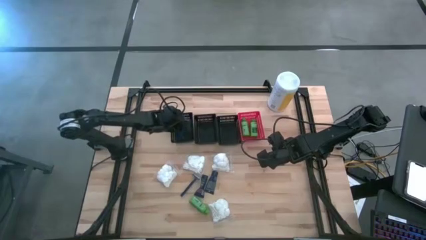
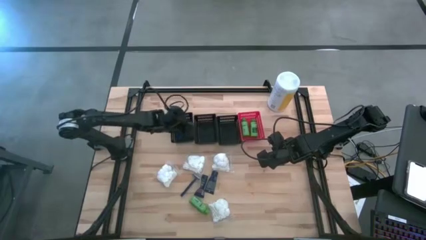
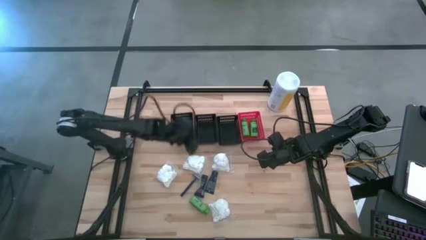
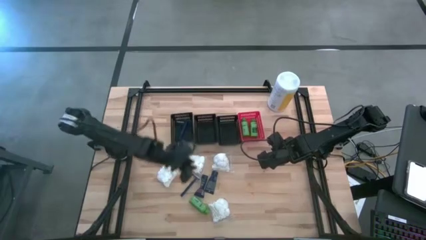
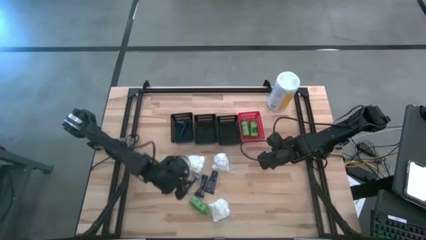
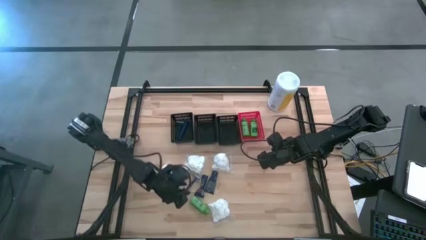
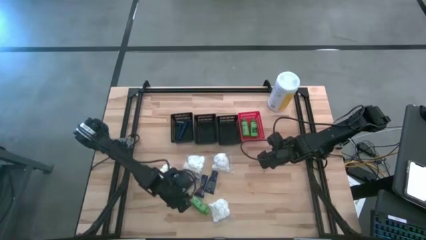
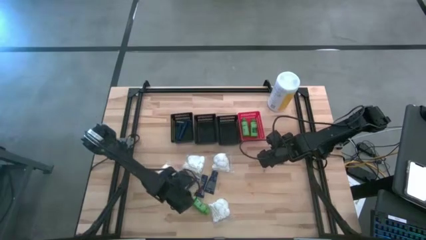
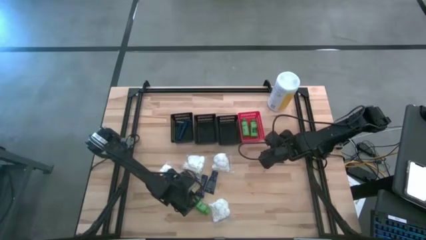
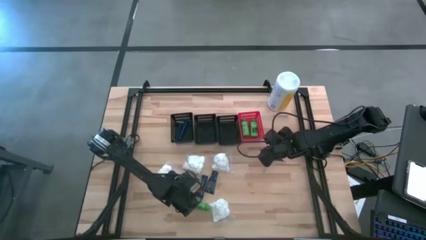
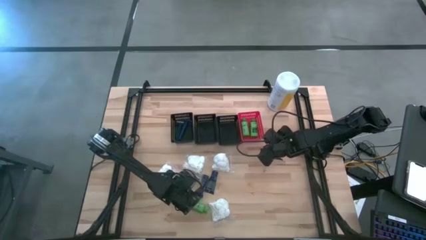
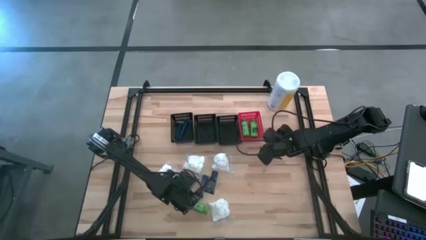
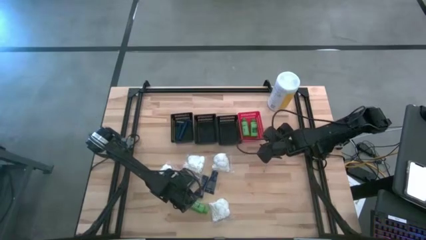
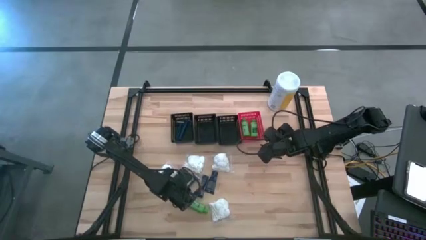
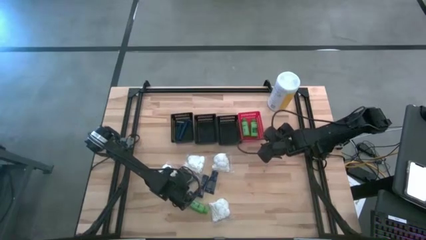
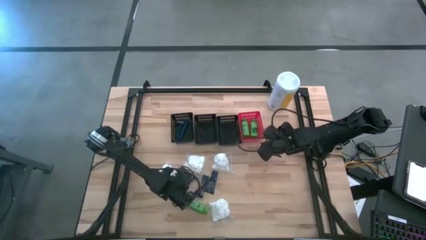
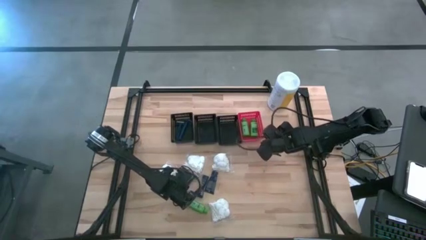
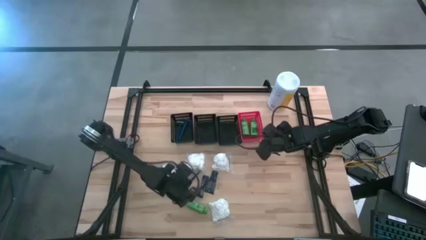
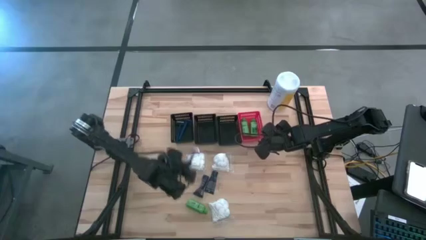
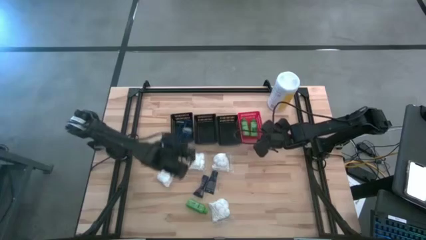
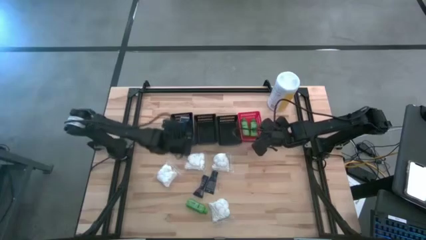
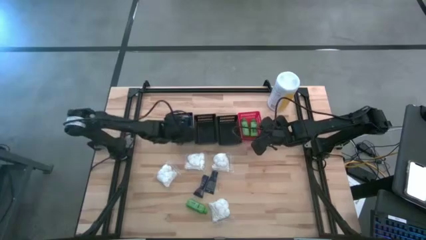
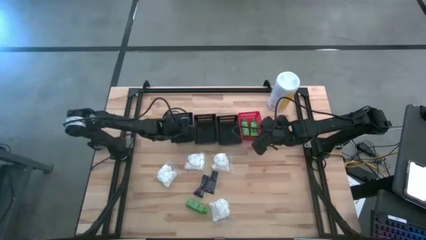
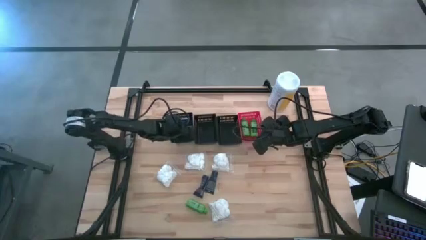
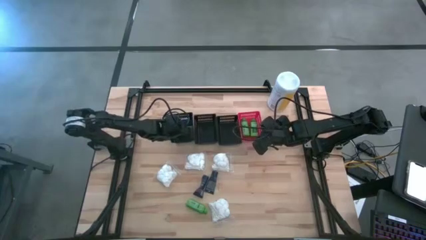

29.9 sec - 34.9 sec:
Task: Pick & Place Travel size toiletries
Put the blue razor into the left black bin

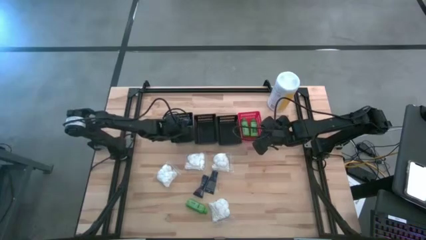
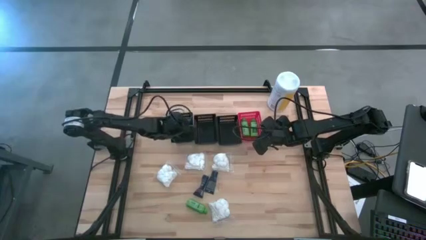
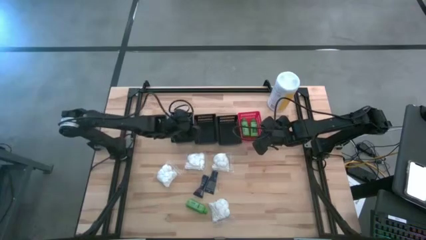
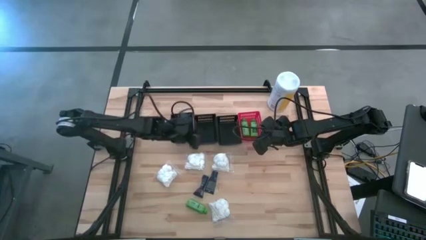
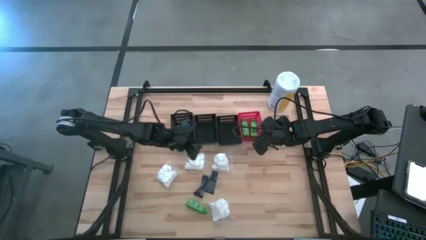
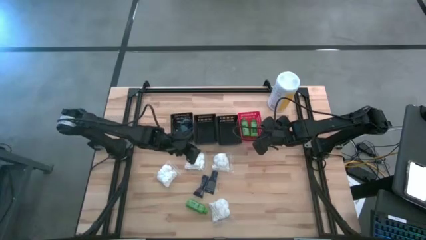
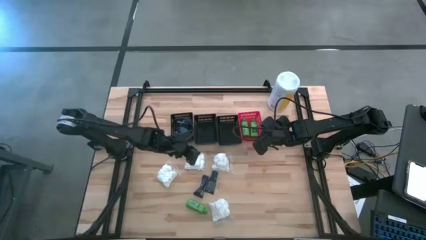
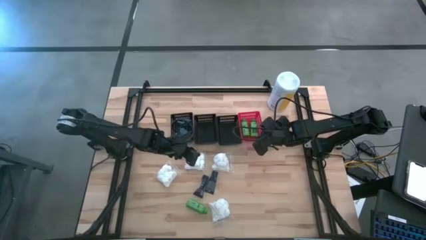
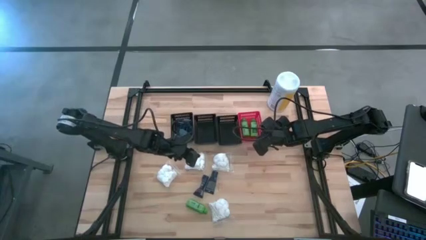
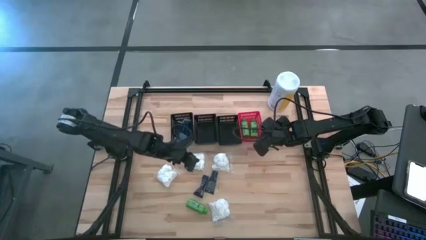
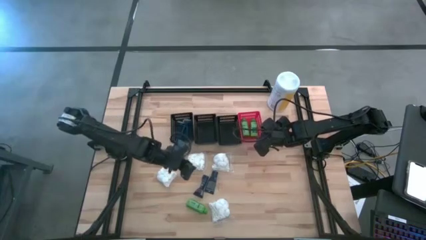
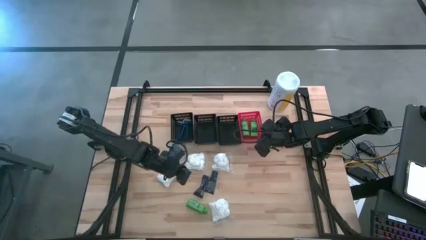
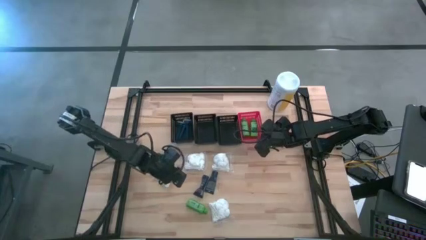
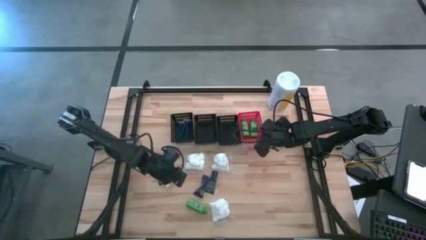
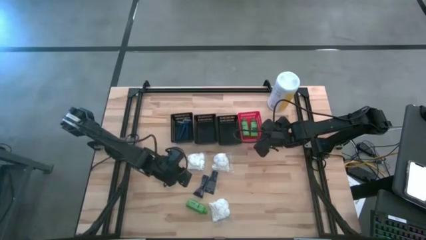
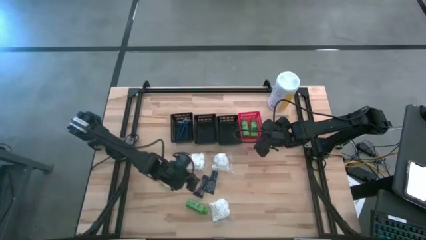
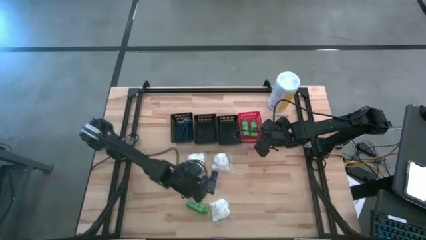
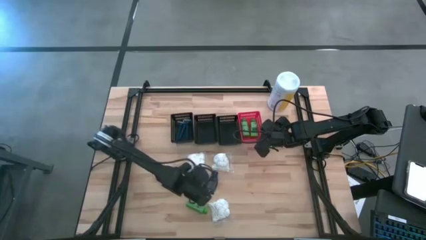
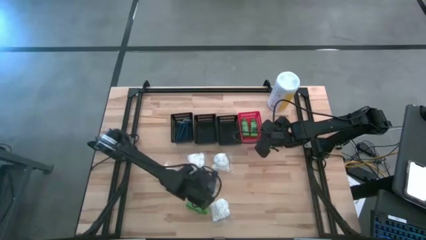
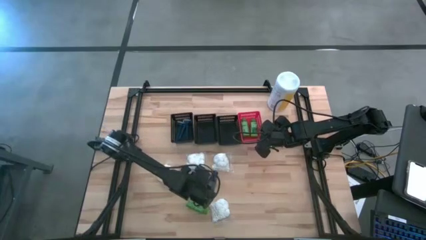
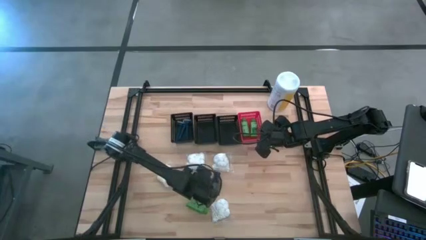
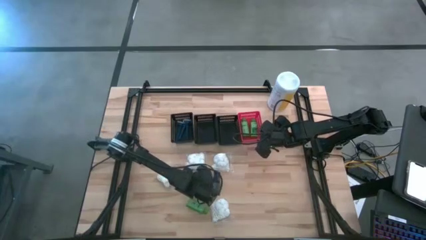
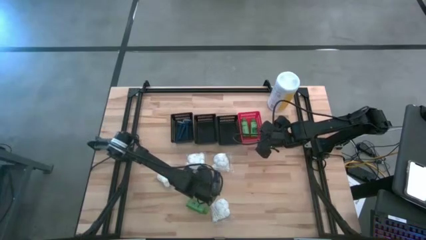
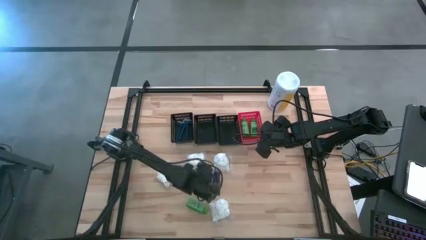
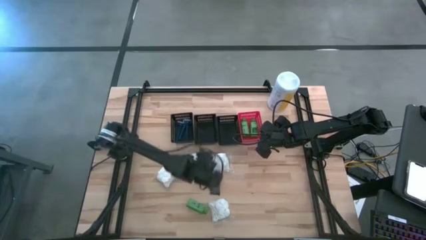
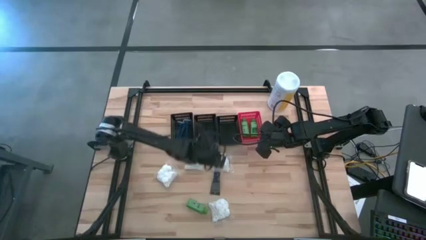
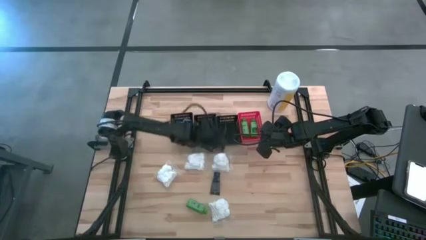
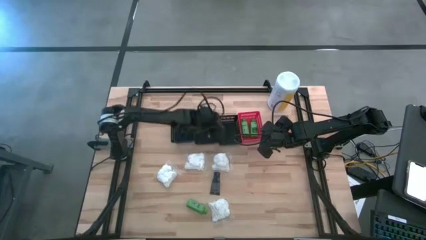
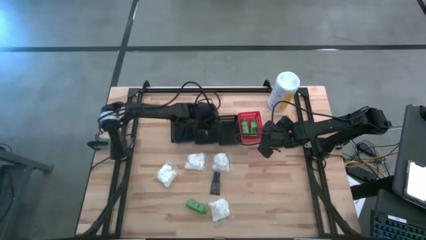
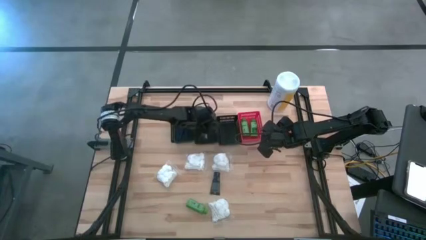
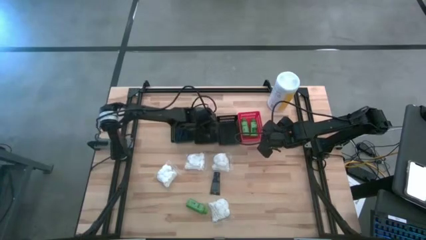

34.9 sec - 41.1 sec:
Put the blue shave cream into the middle black bin

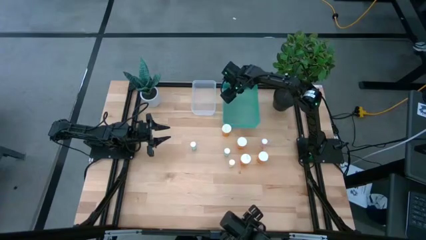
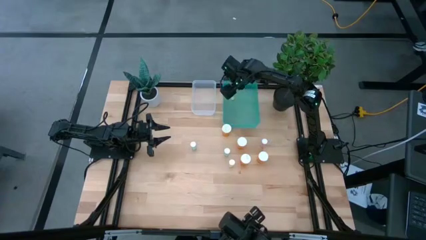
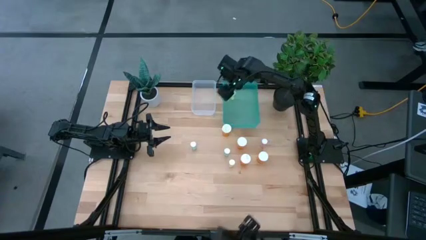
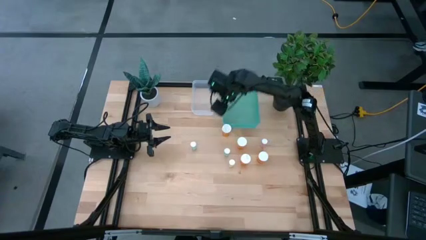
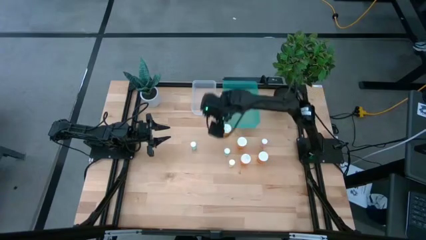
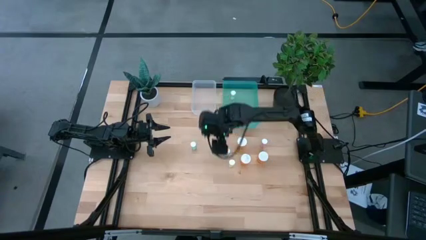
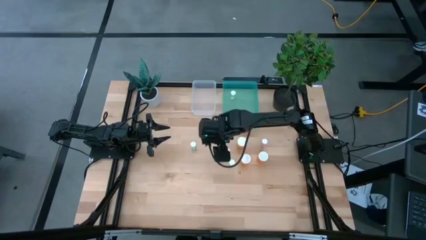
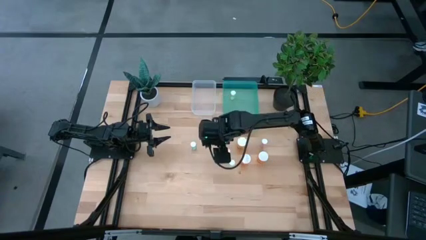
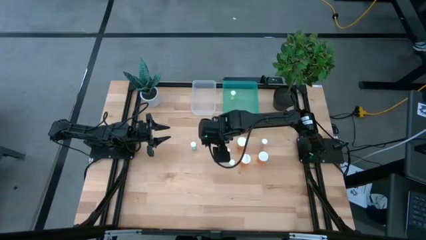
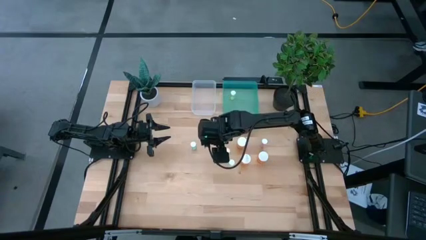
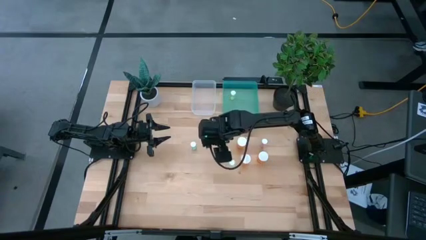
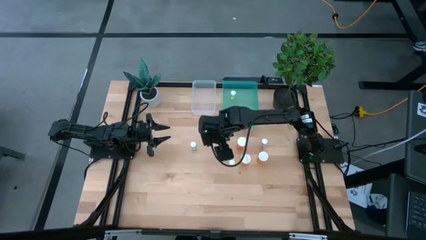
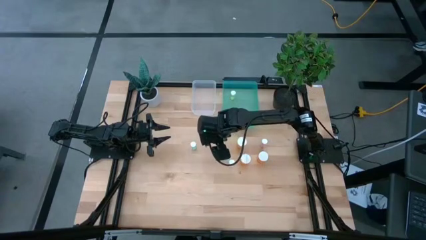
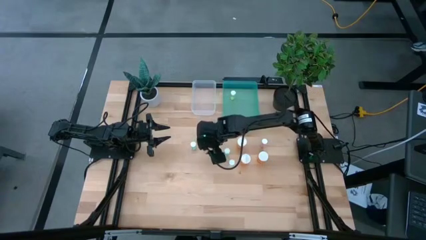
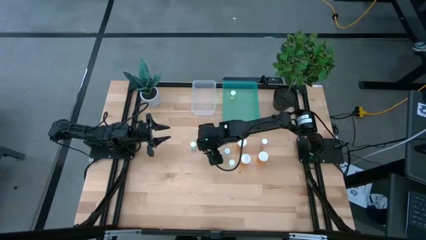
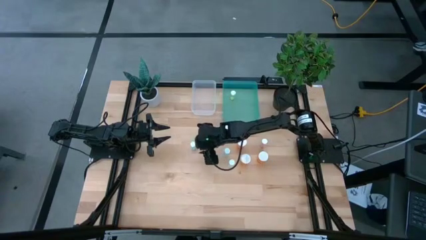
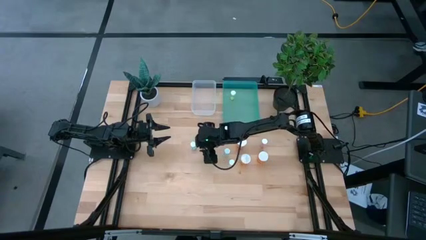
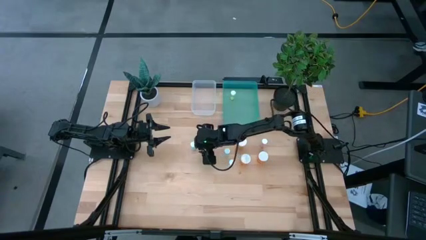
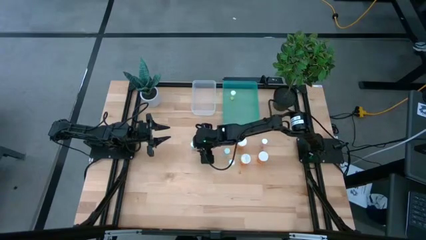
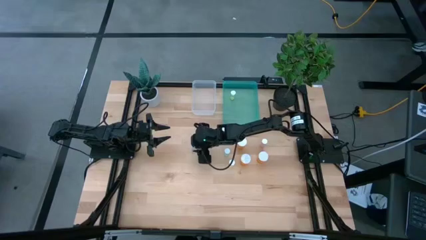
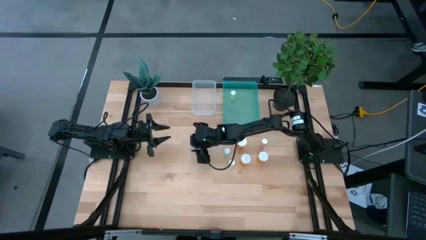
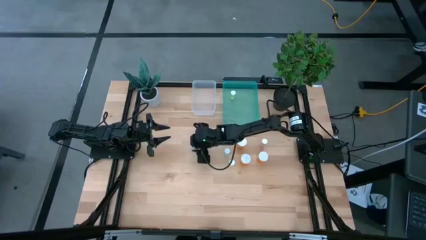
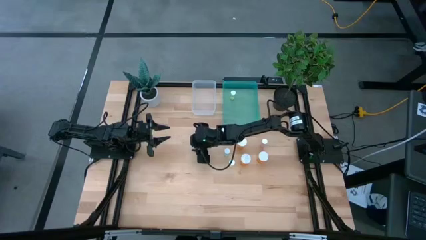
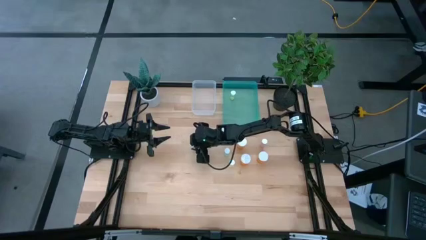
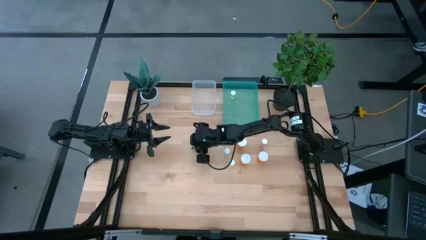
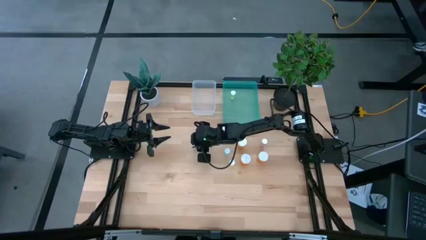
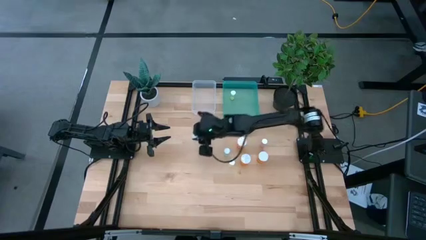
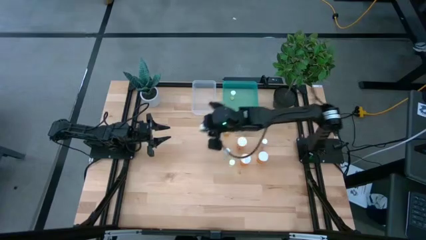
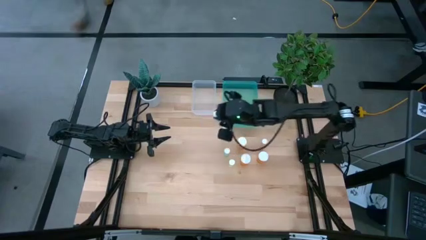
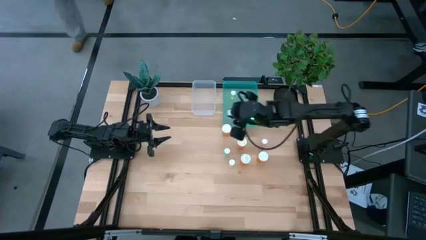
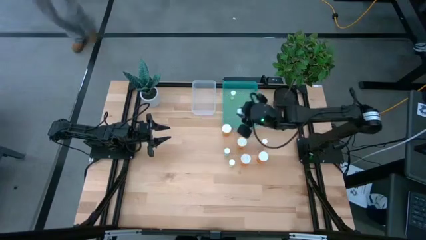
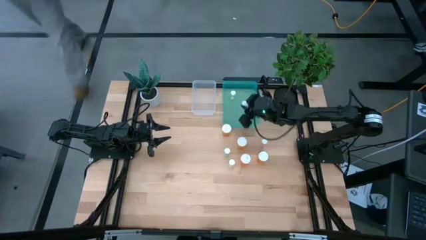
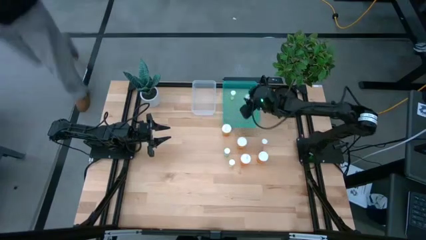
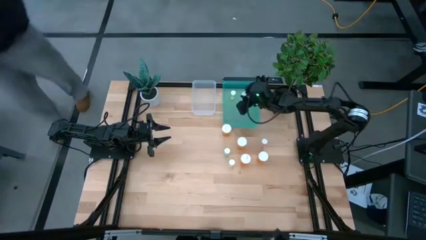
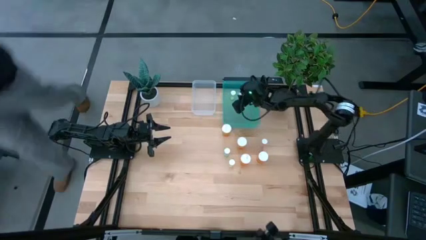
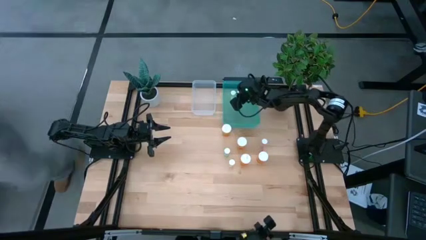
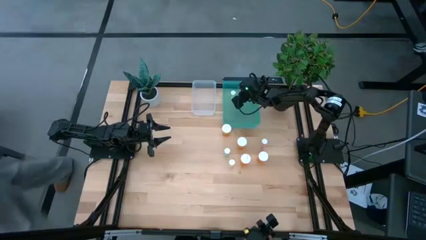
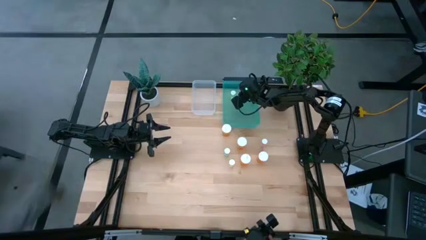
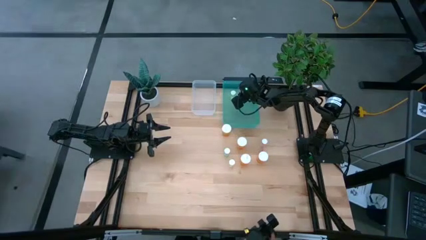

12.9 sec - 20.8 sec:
Task: Pick and place medicine bottles into bin by pill shape (circle, oval)
Put the blue tablet bottle into the blue bin
